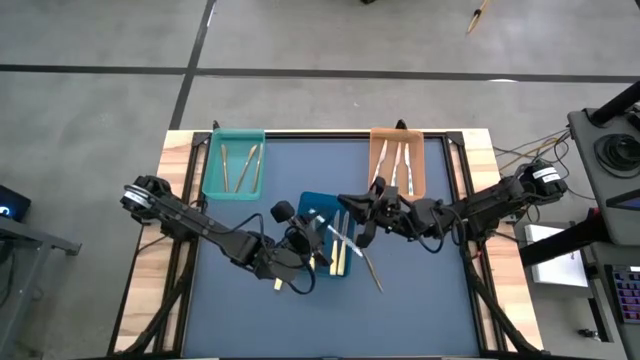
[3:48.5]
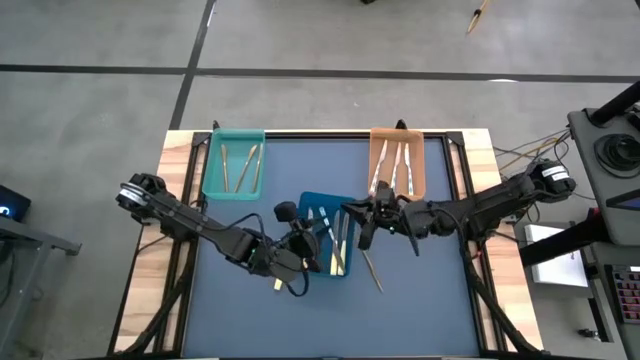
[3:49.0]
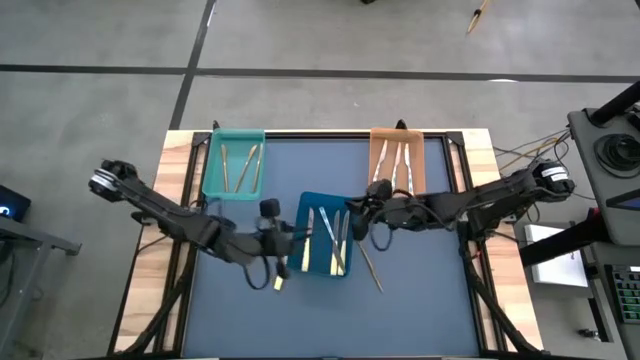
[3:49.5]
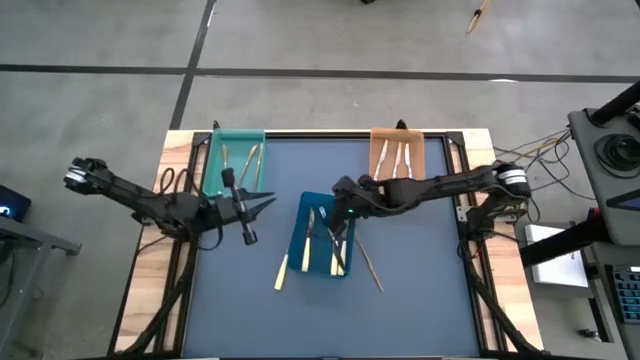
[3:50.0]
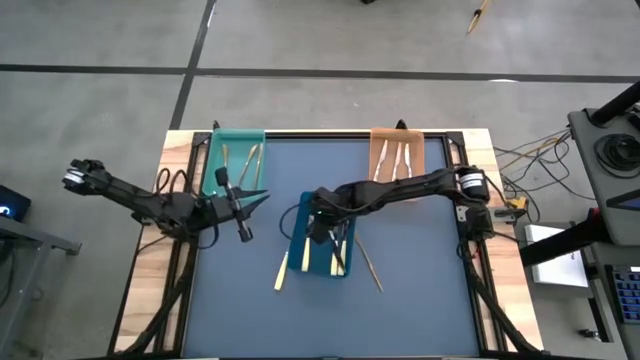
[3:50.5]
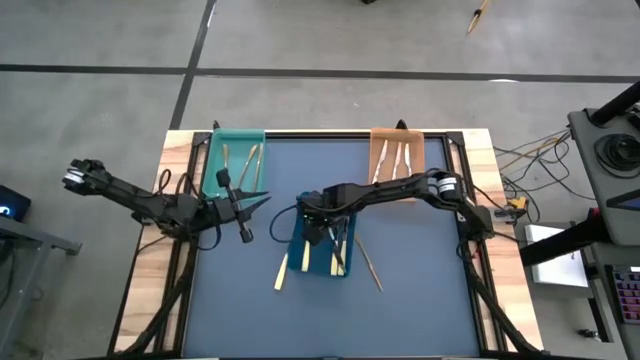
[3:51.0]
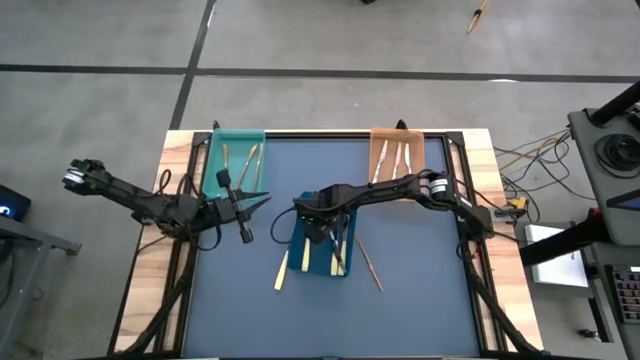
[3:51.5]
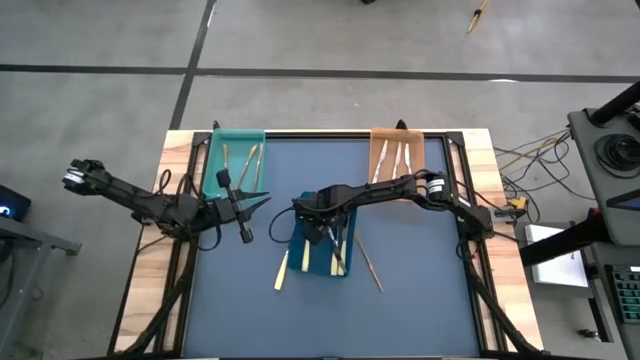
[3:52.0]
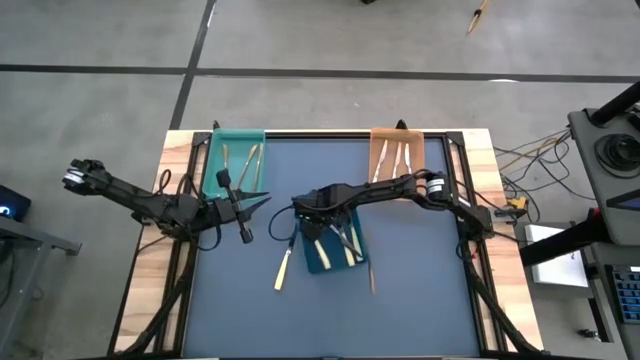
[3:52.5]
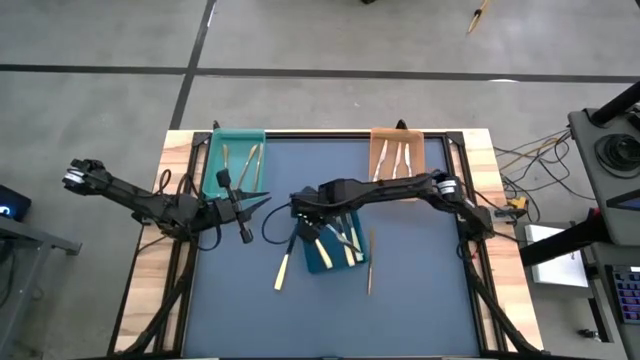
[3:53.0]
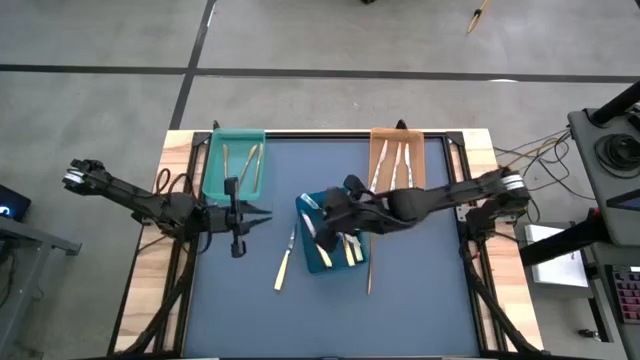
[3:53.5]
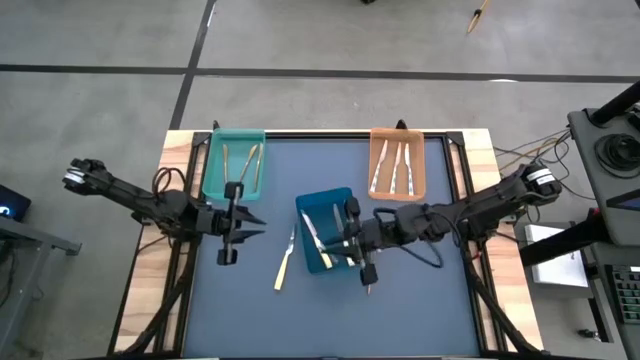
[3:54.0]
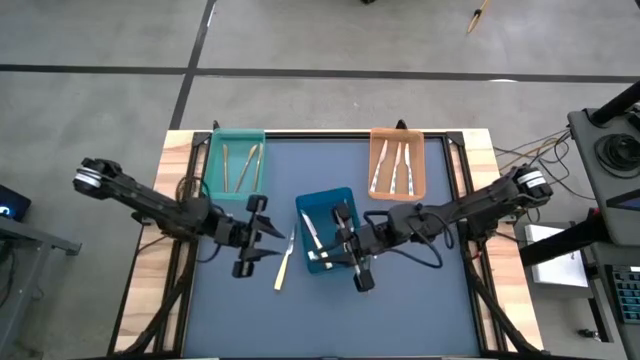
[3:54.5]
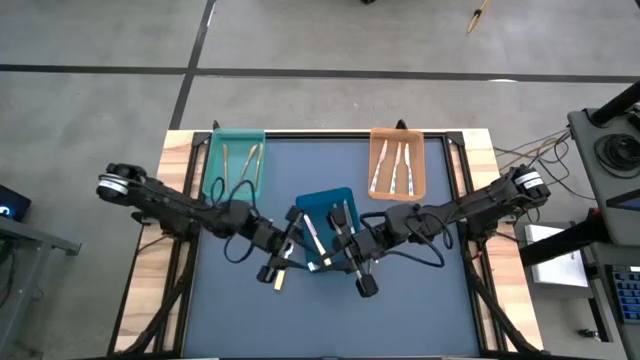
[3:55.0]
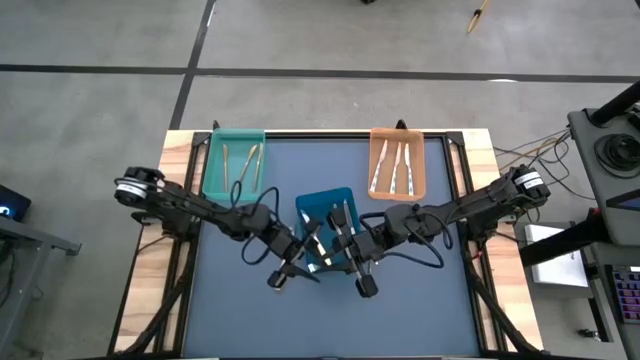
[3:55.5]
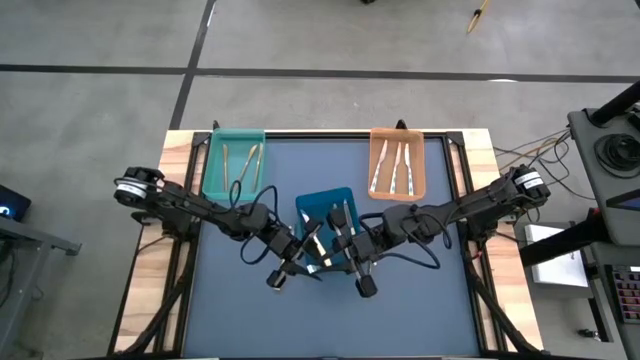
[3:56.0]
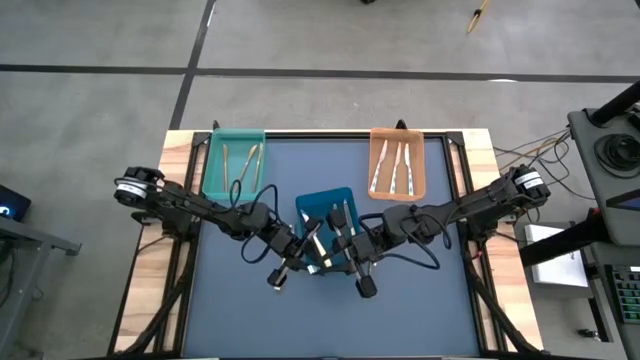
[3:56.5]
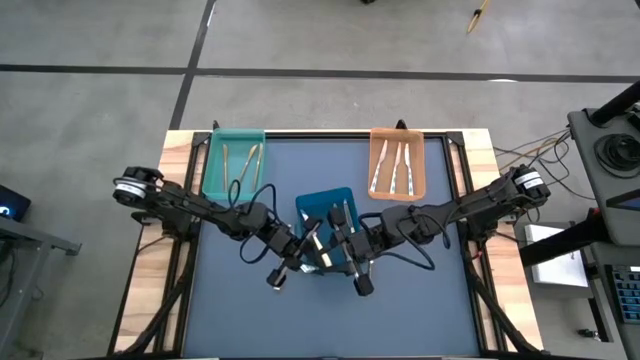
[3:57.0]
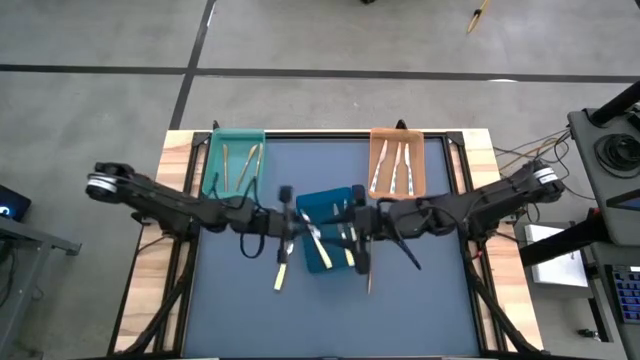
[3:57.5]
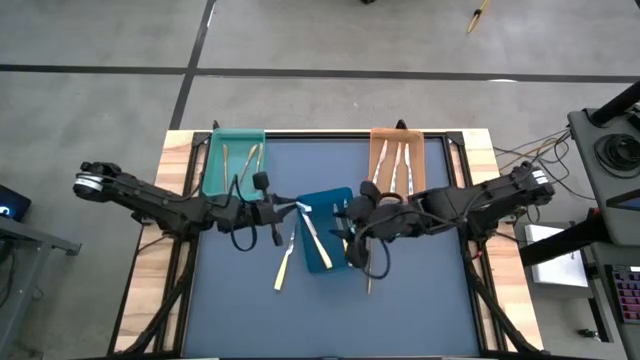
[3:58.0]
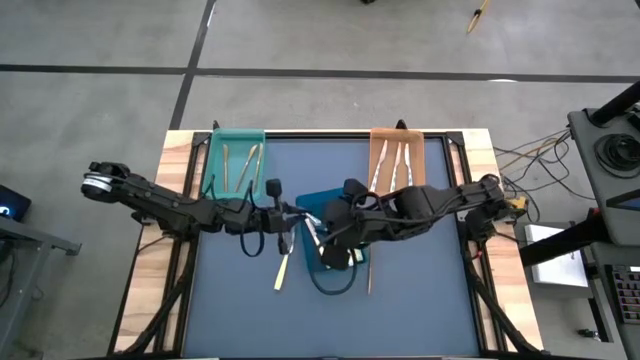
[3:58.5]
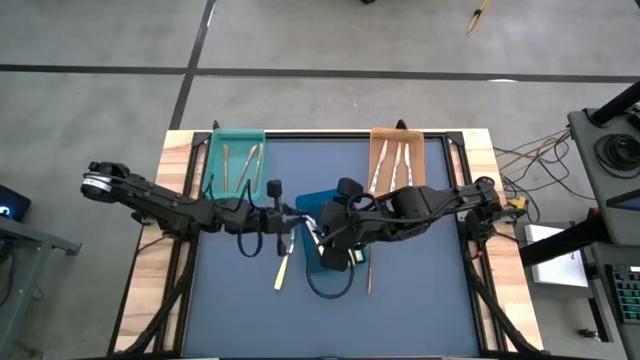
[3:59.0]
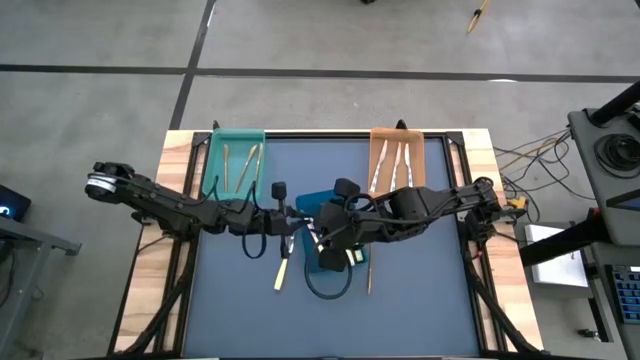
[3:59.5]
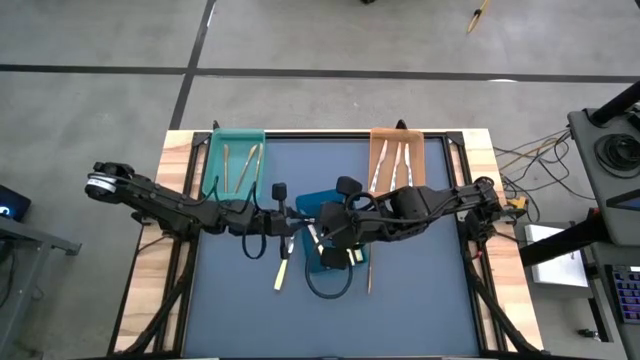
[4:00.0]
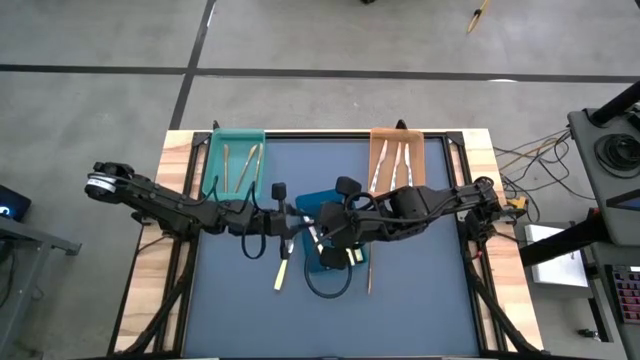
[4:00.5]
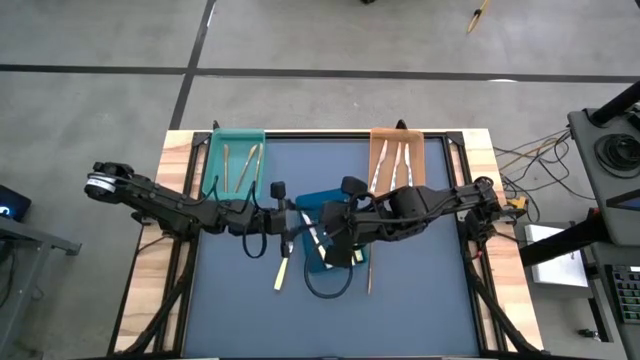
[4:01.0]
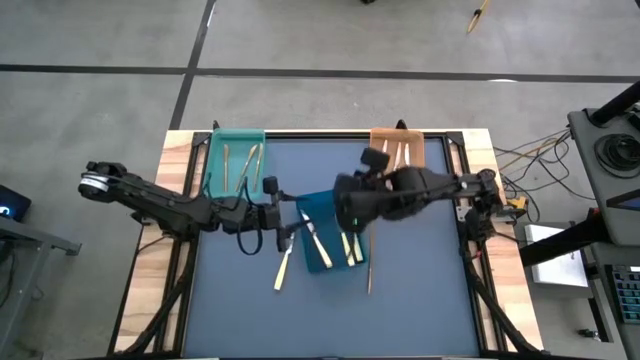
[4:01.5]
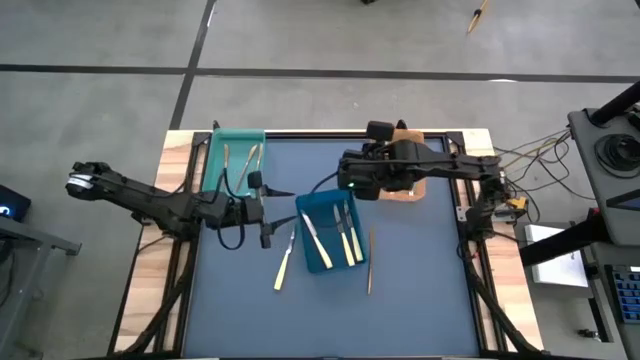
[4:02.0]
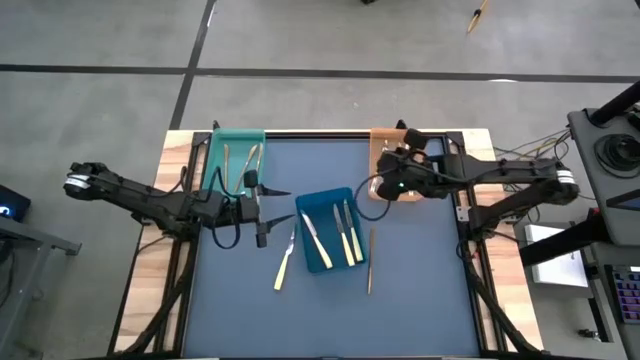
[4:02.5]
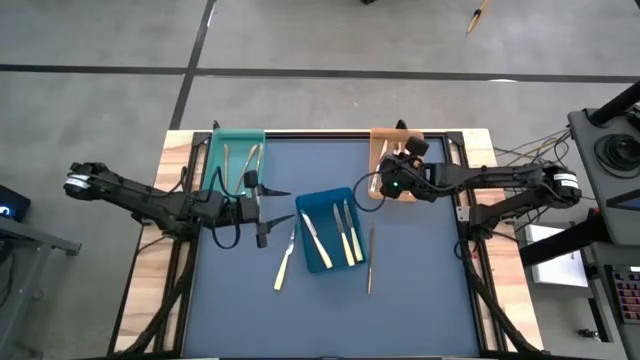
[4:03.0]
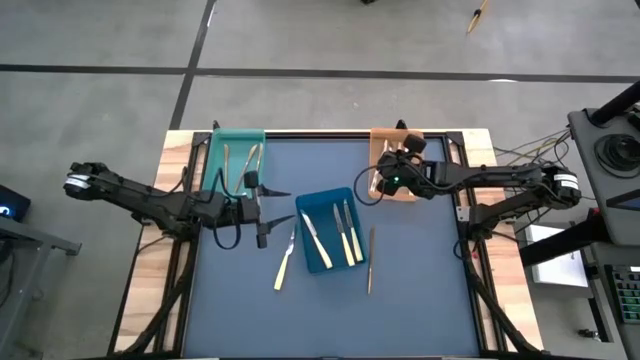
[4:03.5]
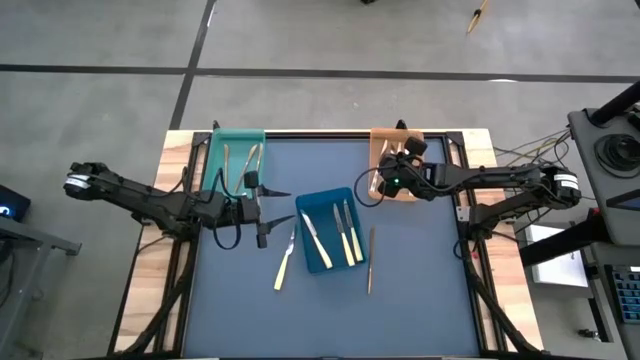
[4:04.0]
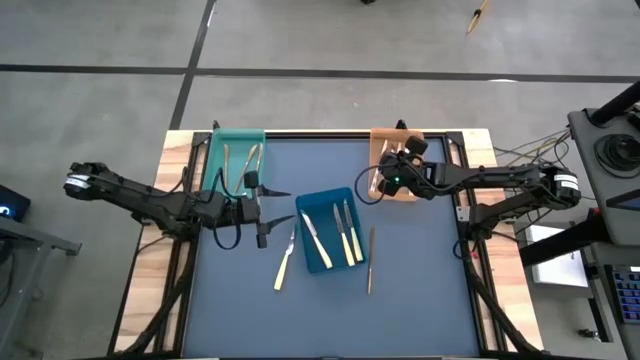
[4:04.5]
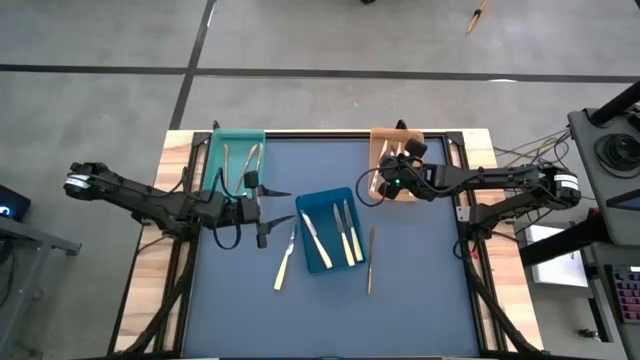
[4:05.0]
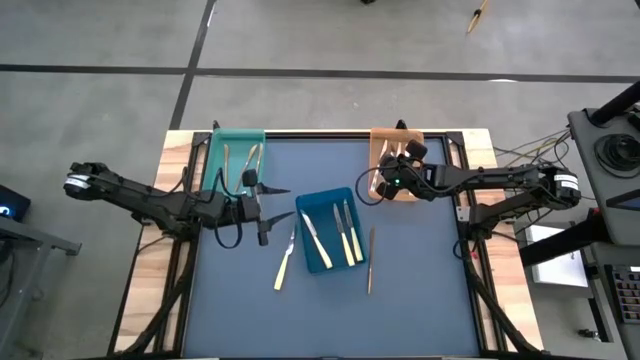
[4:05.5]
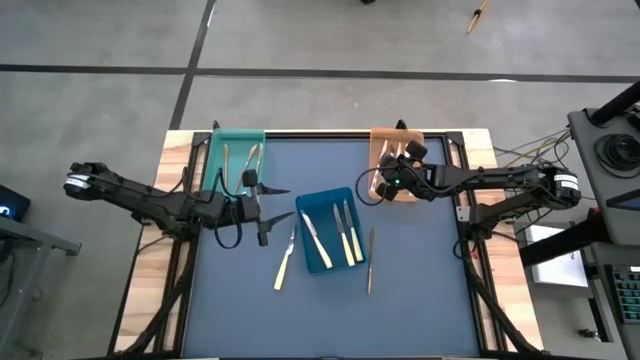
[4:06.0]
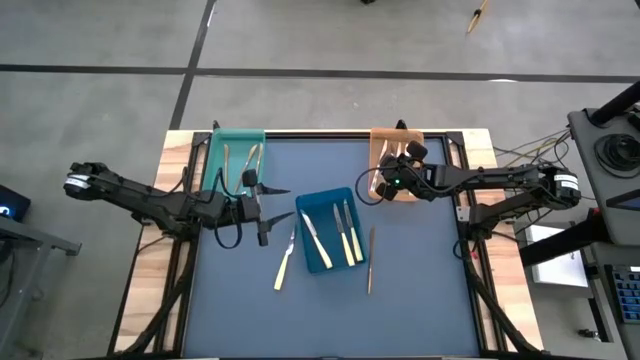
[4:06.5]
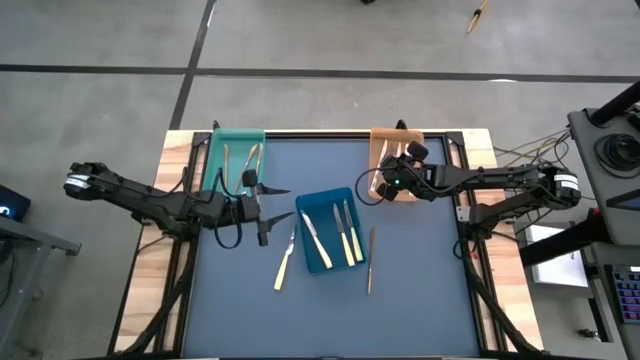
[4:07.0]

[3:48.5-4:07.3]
Task: Sort silverware by color (type)
Put the blue and white knife into the orange bin

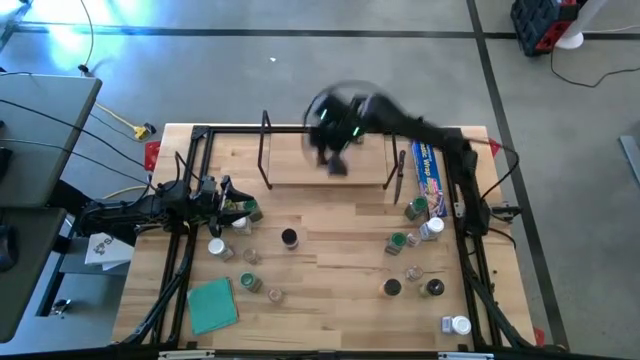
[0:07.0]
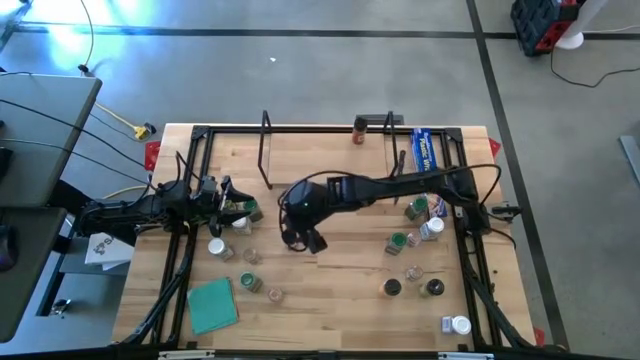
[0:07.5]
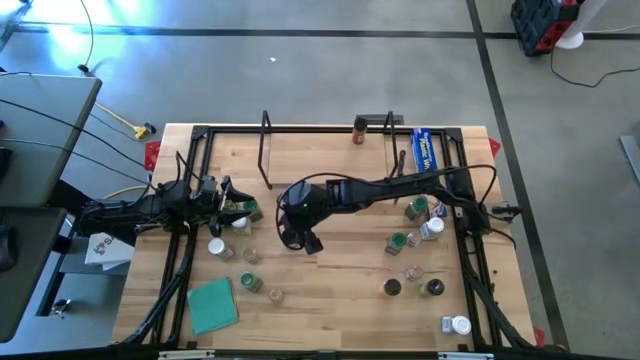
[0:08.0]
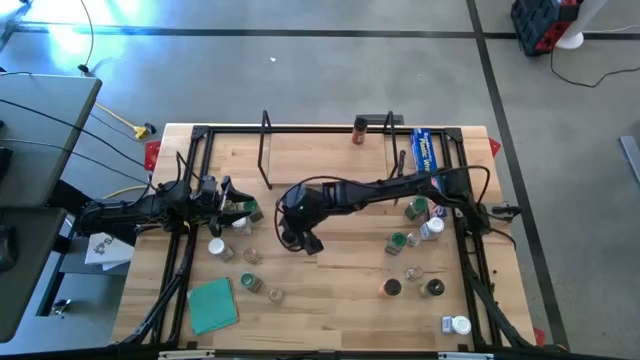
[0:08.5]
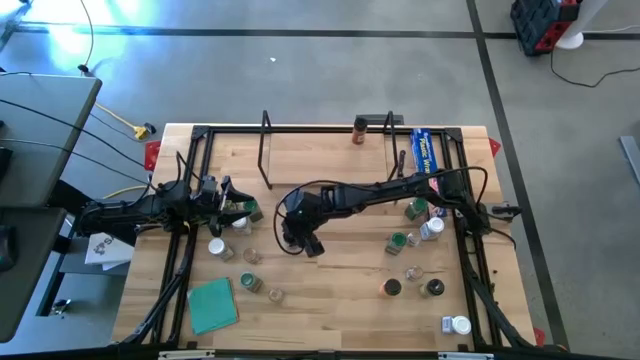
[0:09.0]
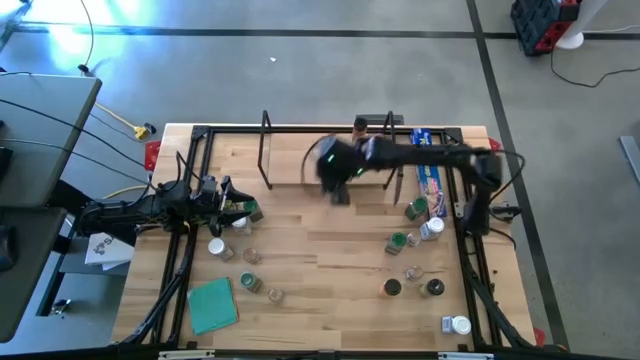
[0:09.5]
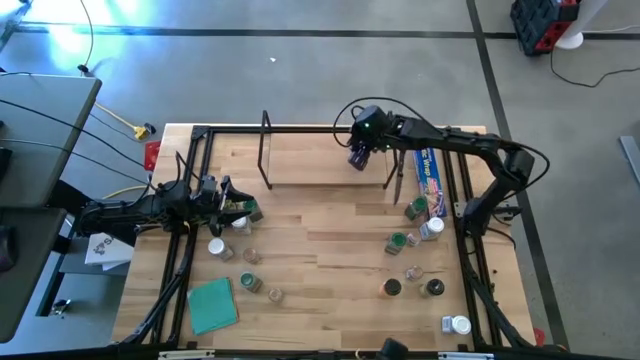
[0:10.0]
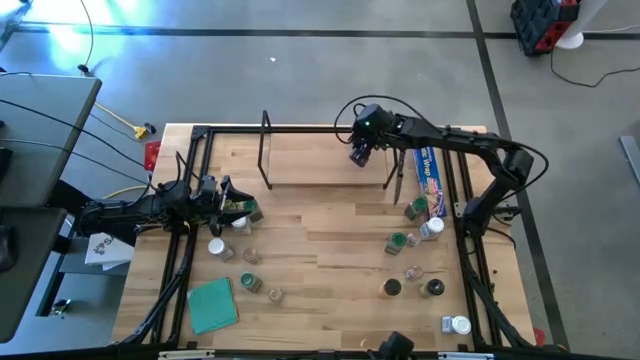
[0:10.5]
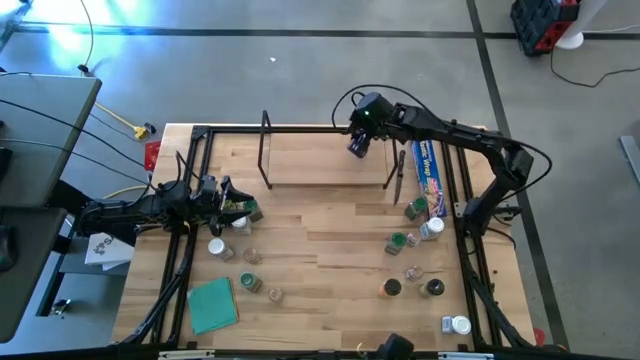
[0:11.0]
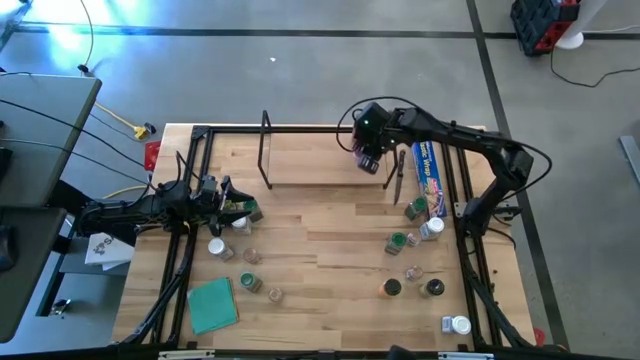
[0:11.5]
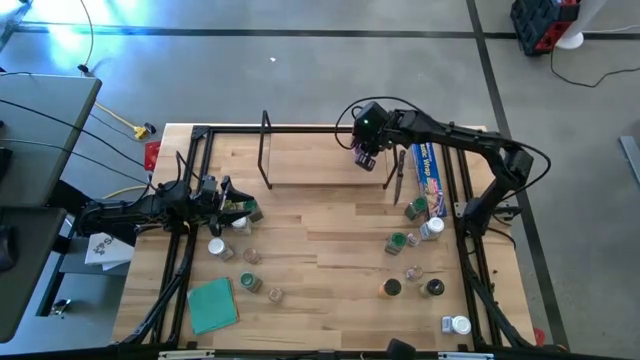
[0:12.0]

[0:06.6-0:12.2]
Task: Shelf spices
Put the black purple seasoning bottle on the shelf
